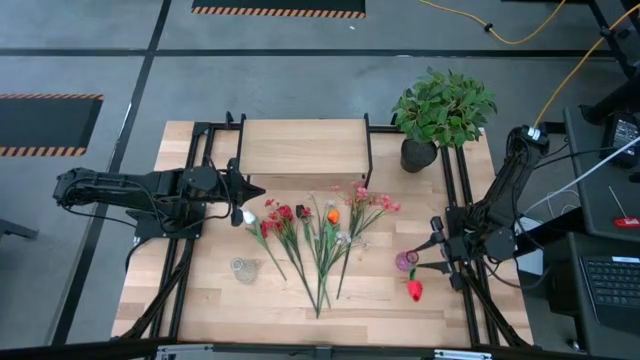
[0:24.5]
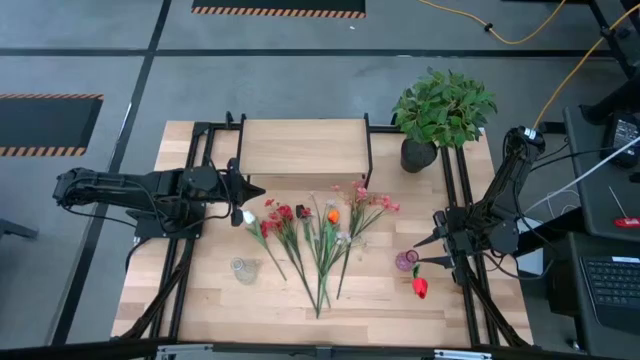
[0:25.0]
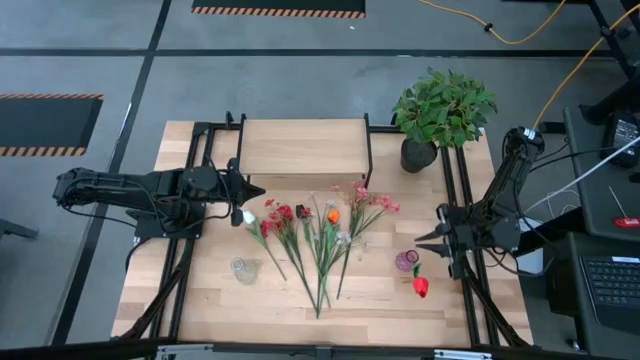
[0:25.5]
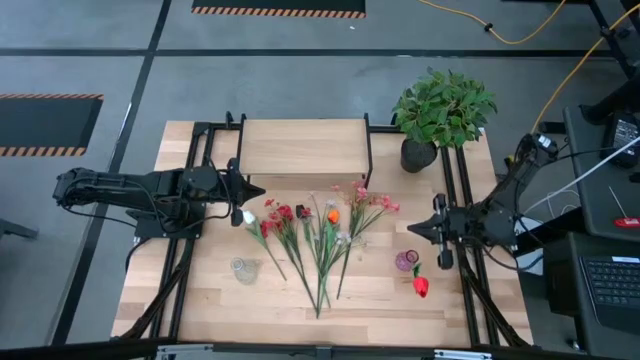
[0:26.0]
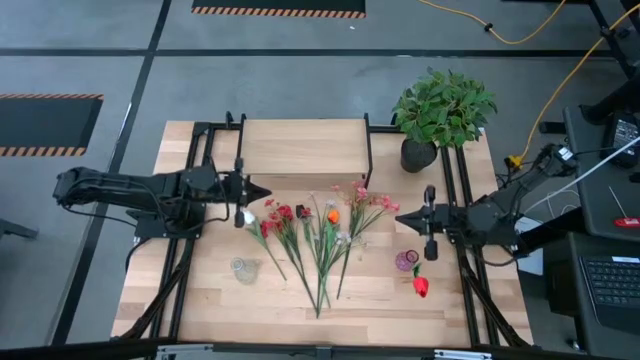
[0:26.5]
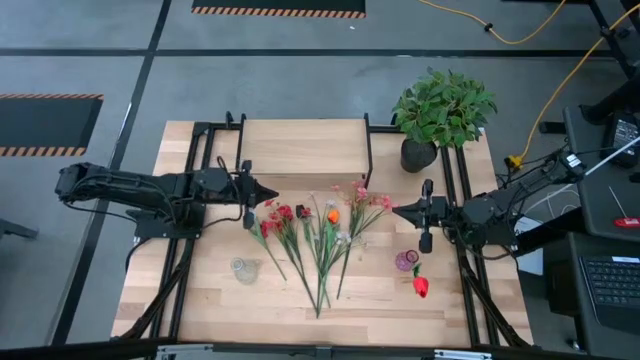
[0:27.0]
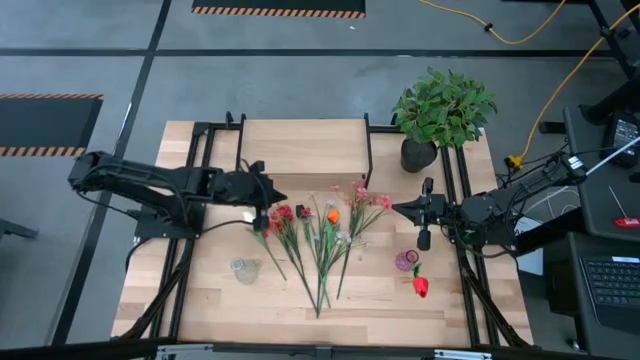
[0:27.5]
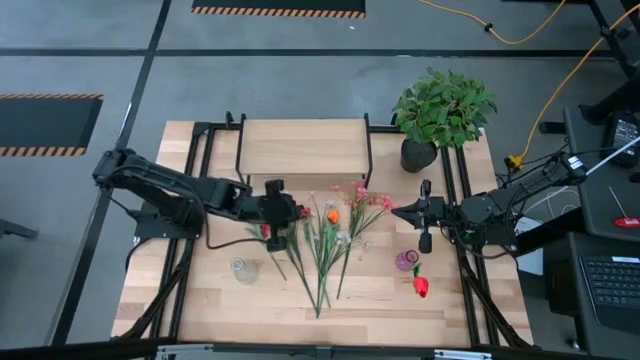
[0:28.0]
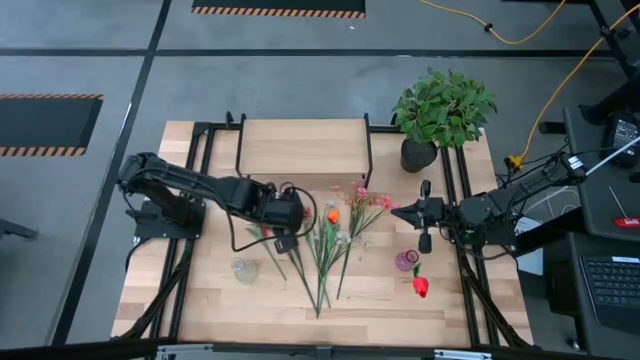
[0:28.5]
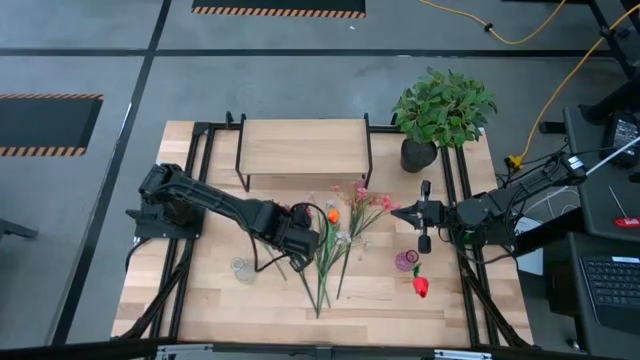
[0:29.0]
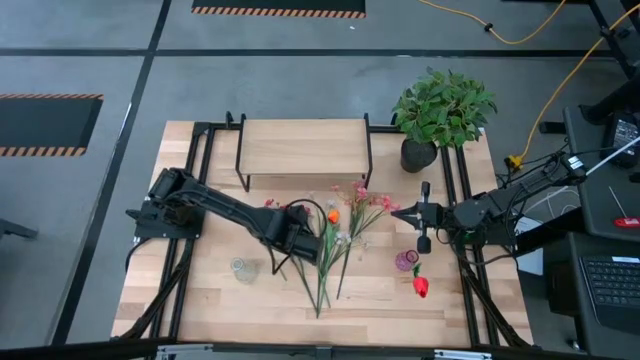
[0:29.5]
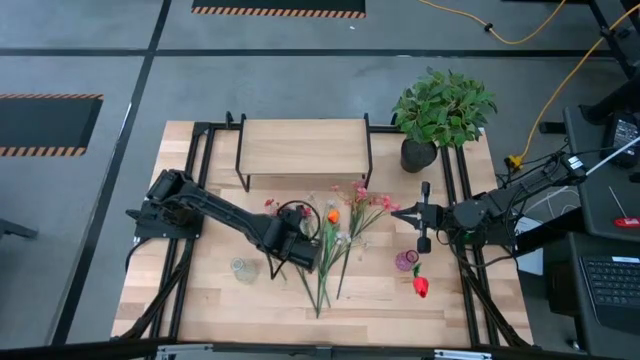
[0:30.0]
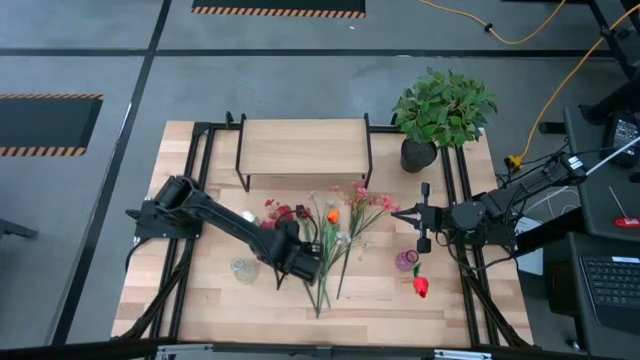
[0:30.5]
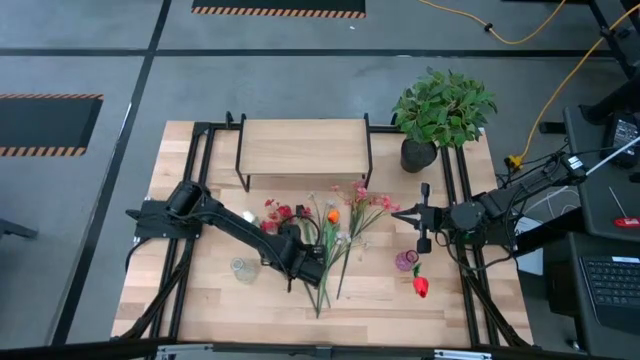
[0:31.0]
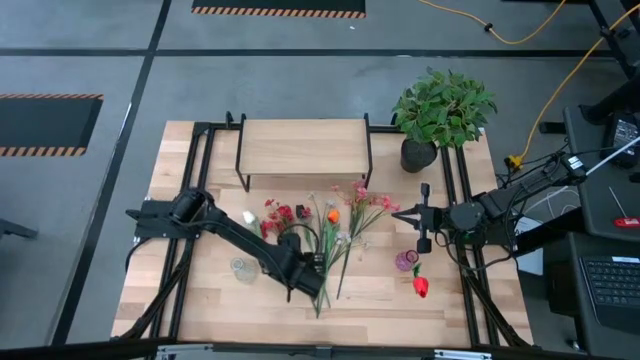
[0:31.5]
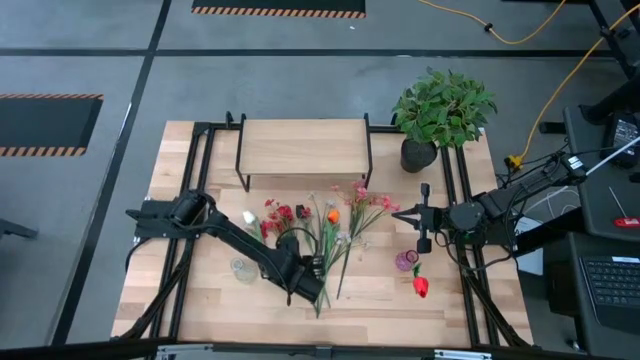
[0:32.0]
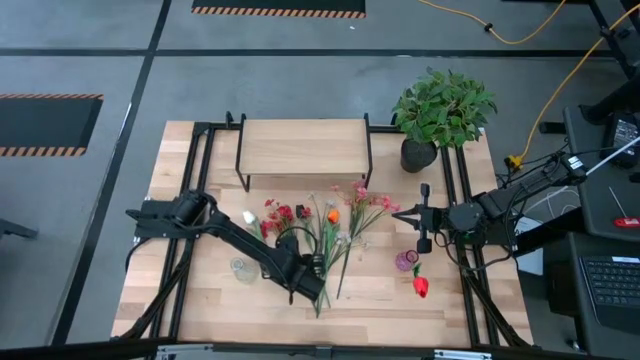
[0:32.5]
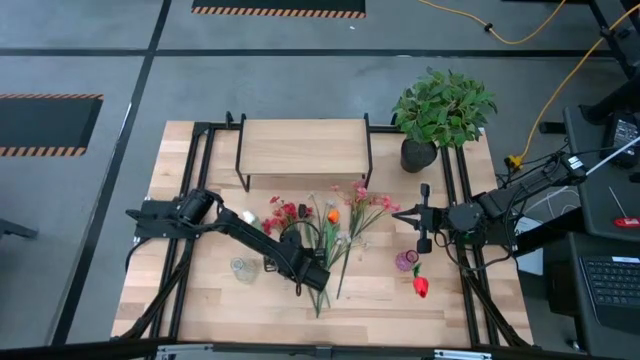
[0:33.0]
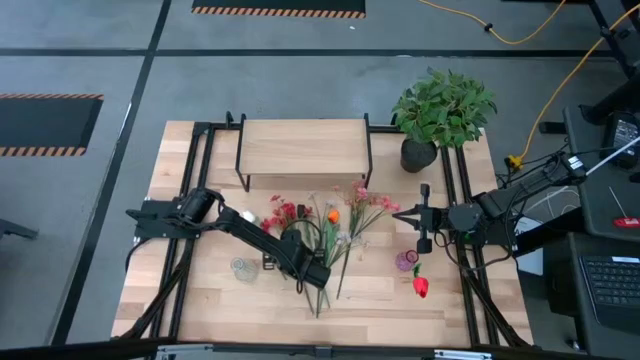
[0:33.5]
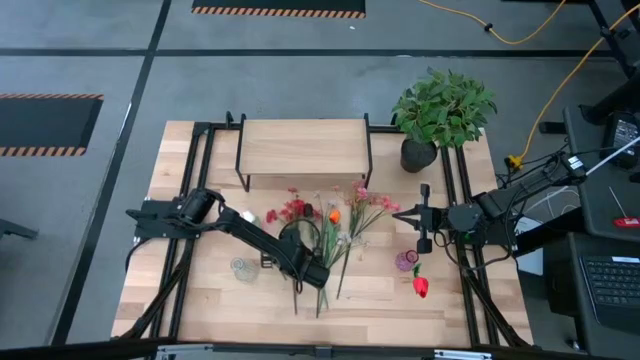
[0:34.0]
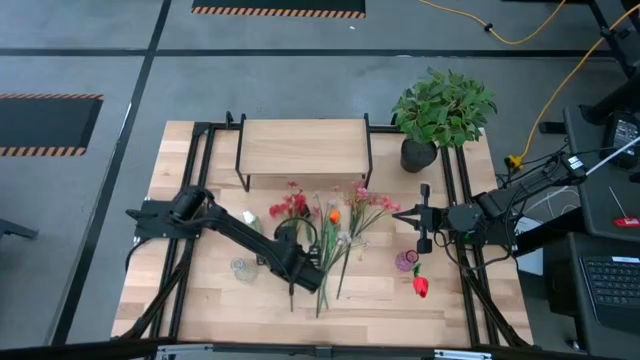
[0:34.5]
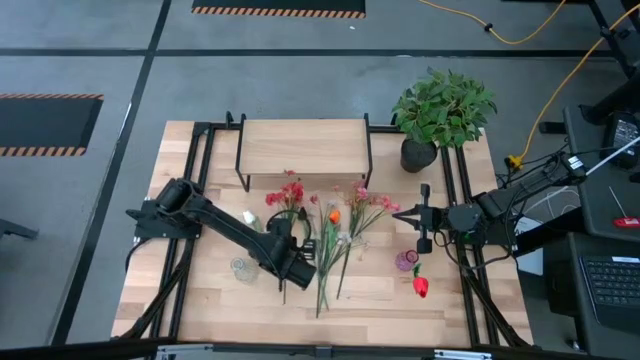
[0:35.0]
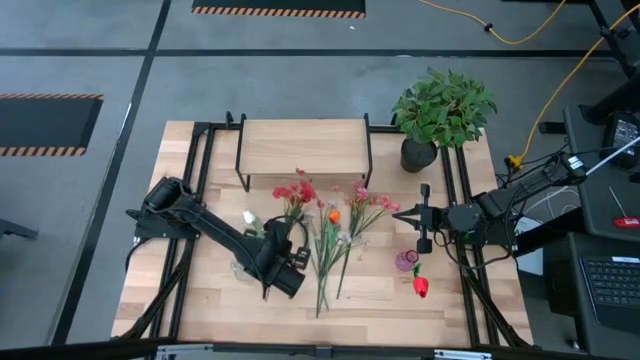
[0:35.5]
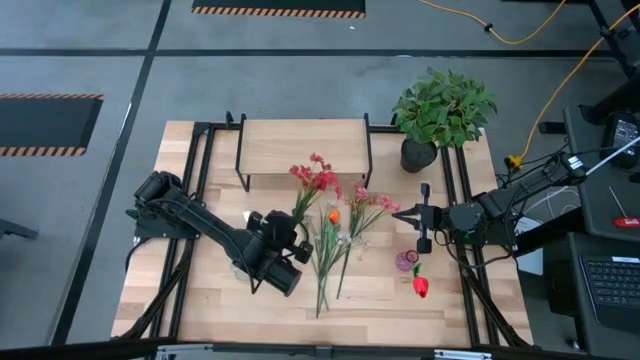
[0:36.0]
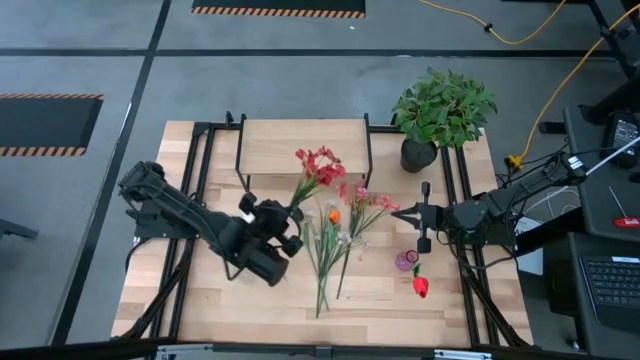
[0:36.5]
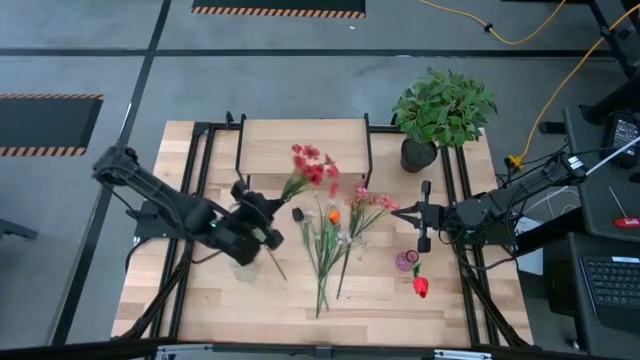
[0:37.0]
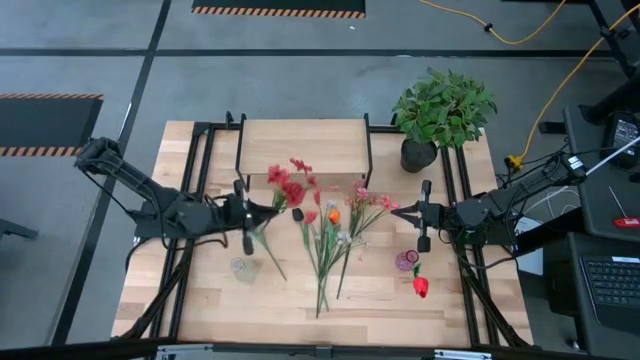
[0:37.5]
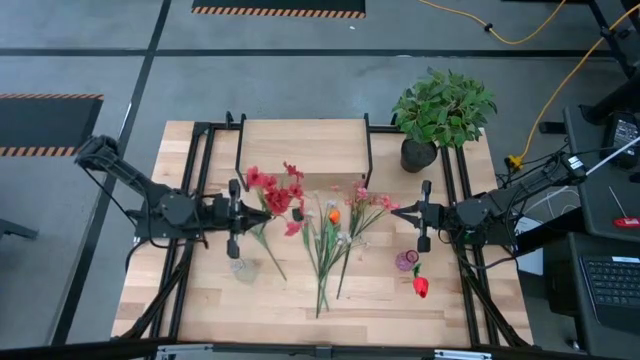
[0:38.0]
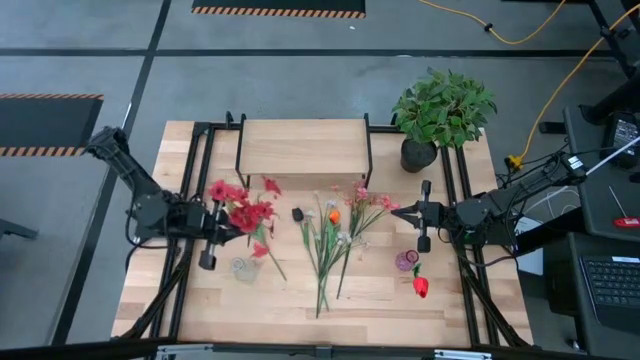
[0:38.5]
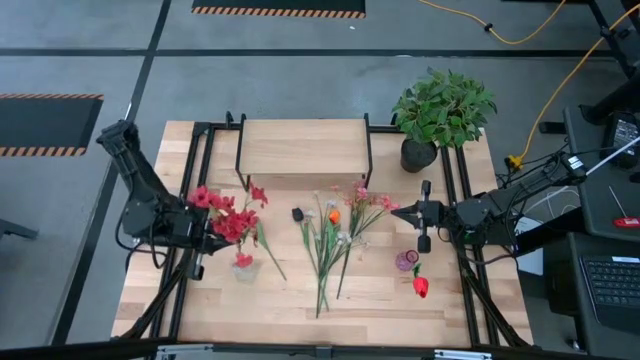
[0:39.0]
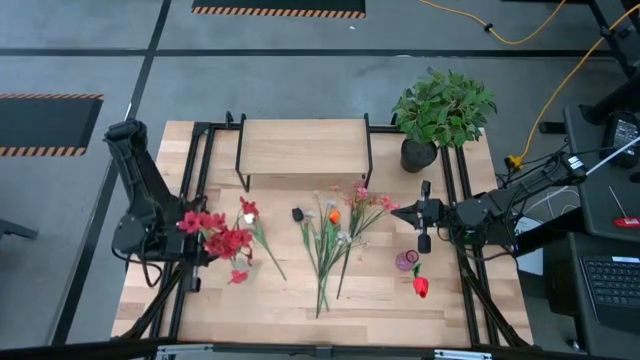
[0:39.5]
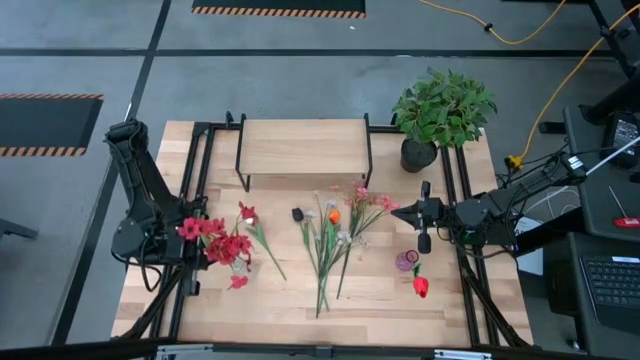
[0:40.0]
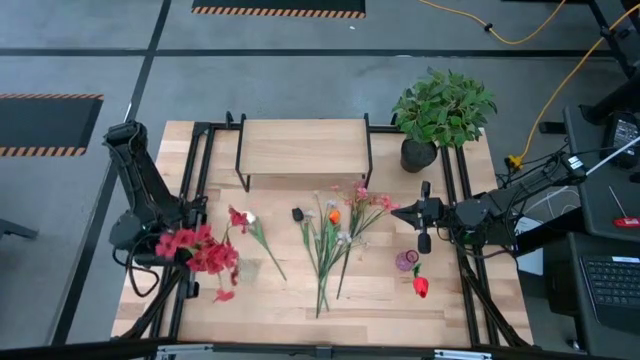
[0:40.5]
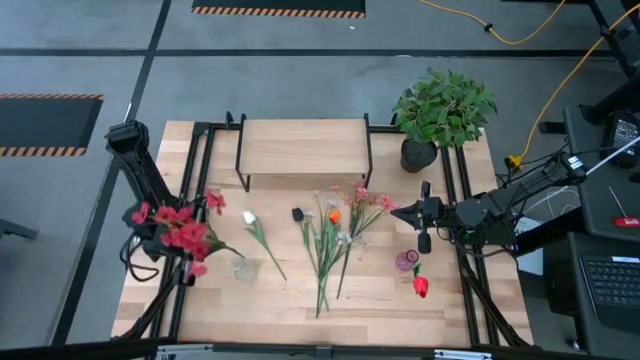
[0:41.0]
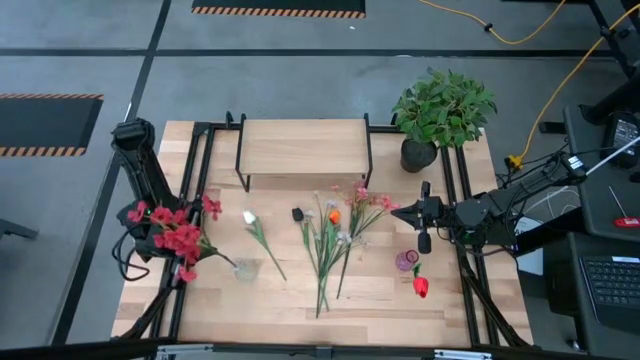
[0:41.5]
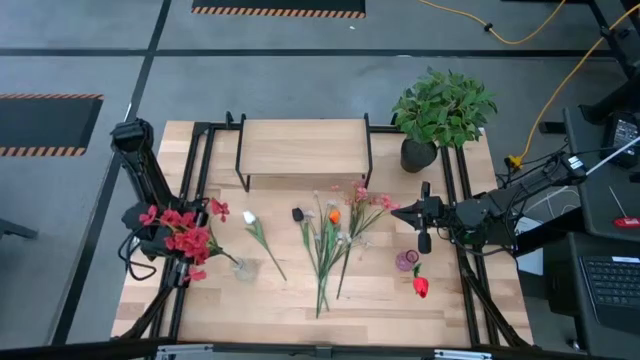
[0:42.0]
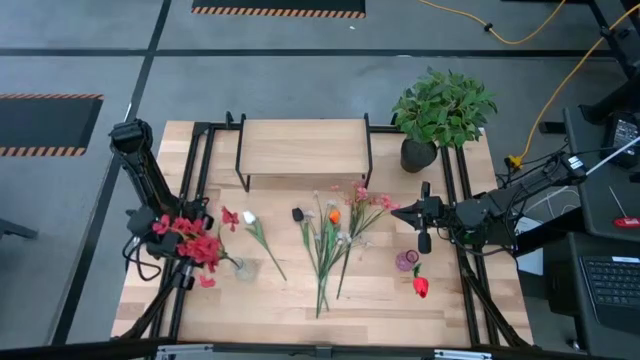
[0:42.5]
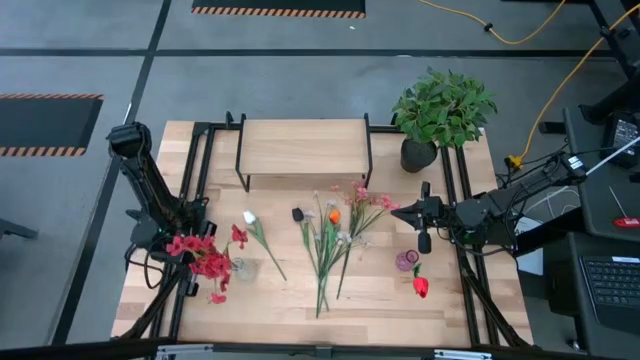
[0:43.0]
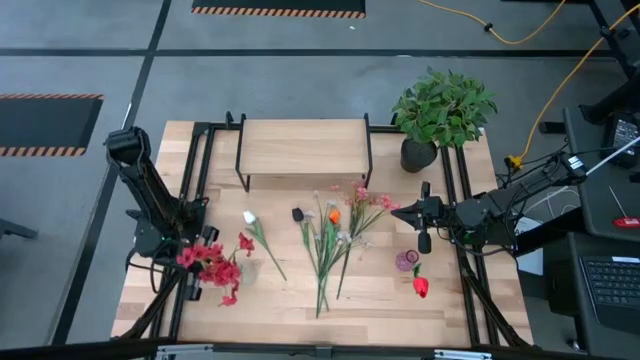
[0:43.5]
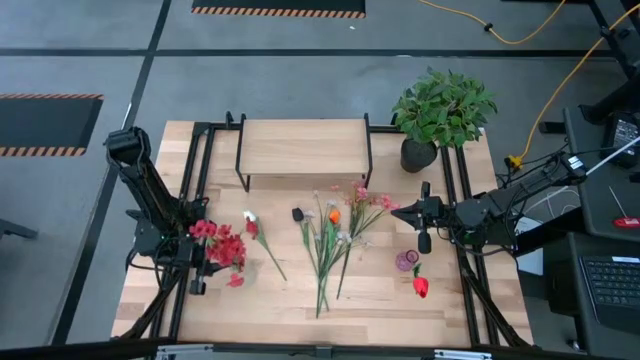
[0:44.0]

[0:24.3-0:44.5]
Task: Pick and place flowers into a vace then onto a shelf
Put the red flowers into the transparent vase
